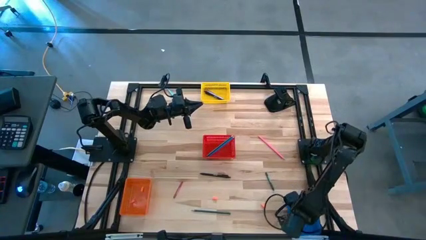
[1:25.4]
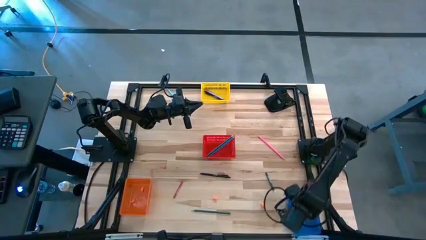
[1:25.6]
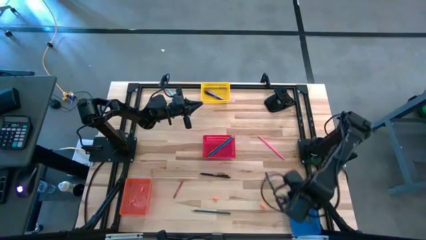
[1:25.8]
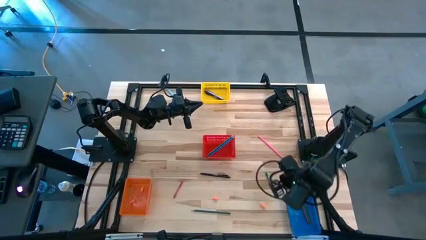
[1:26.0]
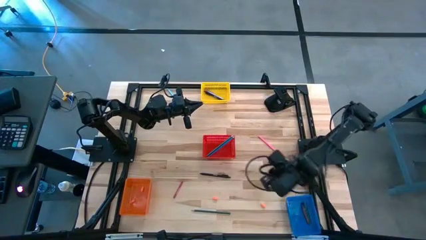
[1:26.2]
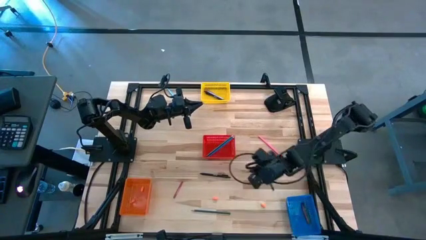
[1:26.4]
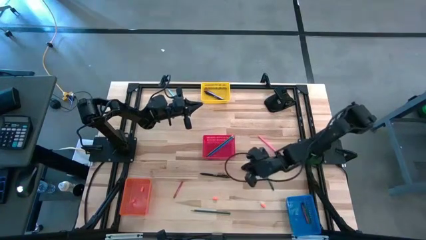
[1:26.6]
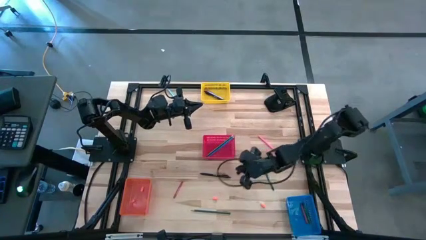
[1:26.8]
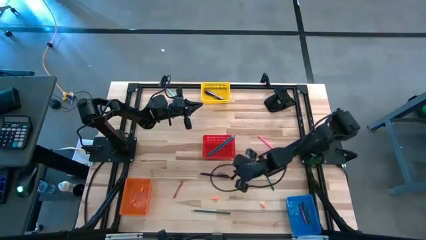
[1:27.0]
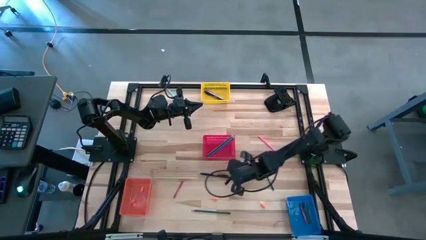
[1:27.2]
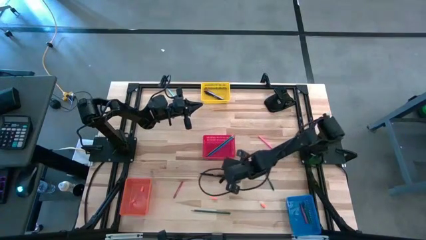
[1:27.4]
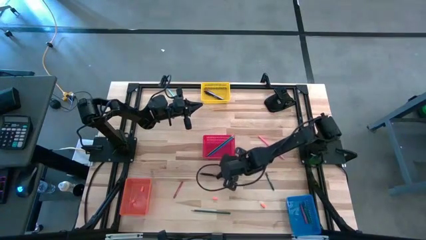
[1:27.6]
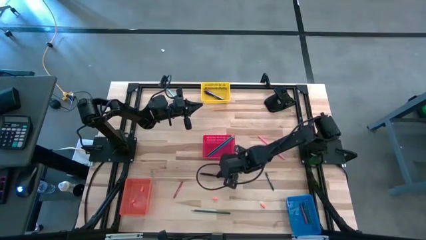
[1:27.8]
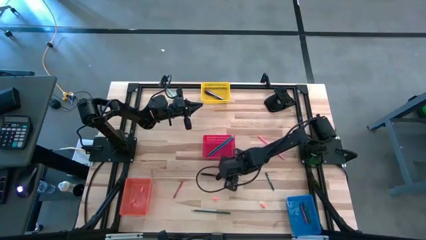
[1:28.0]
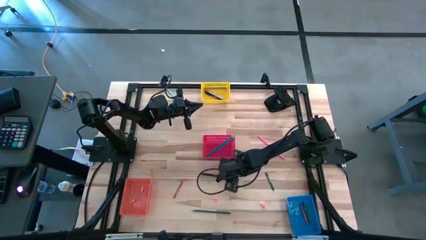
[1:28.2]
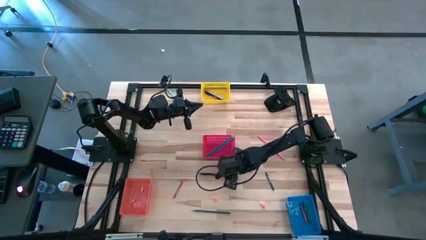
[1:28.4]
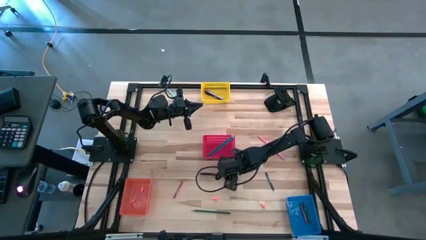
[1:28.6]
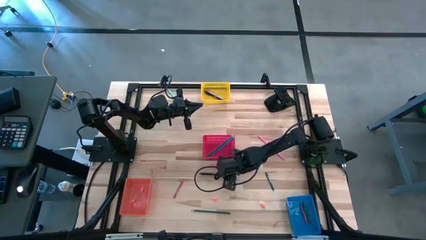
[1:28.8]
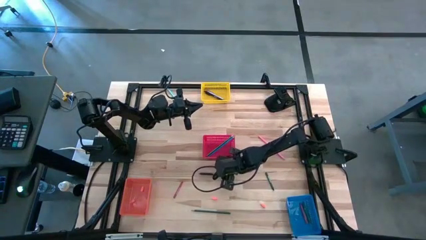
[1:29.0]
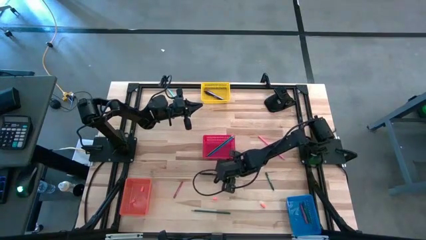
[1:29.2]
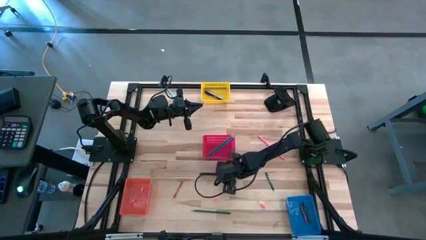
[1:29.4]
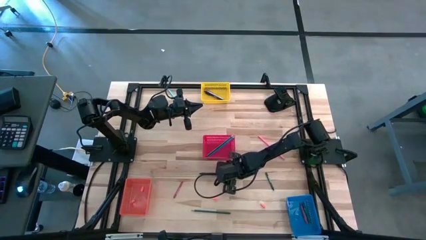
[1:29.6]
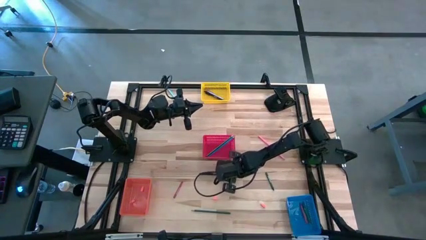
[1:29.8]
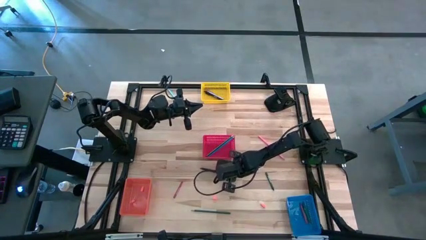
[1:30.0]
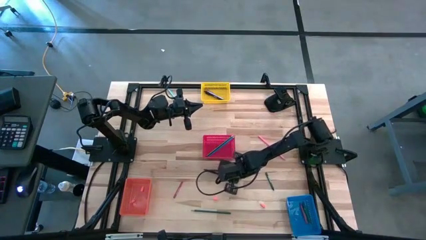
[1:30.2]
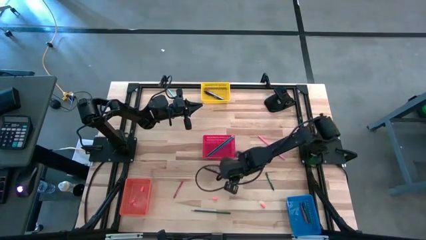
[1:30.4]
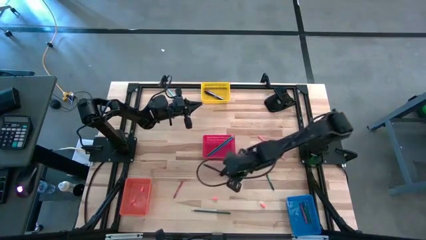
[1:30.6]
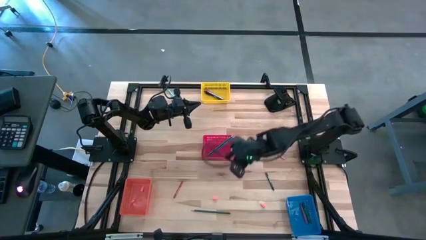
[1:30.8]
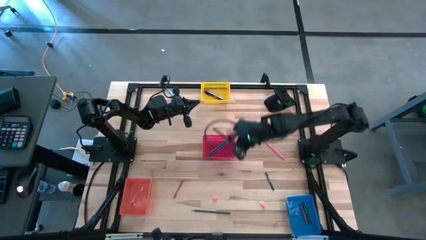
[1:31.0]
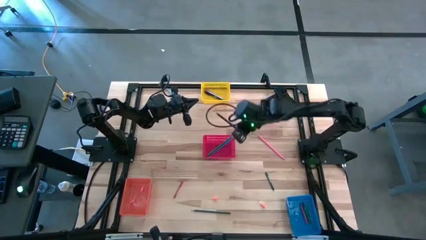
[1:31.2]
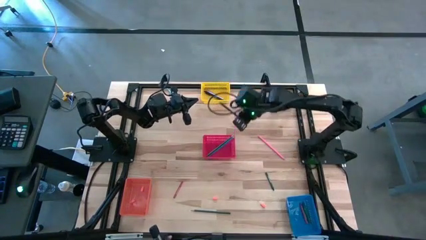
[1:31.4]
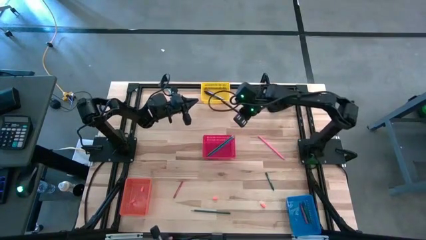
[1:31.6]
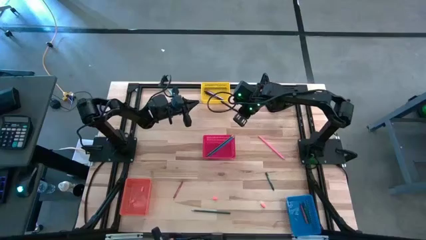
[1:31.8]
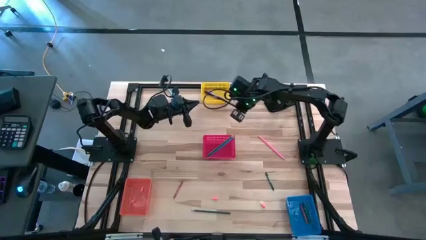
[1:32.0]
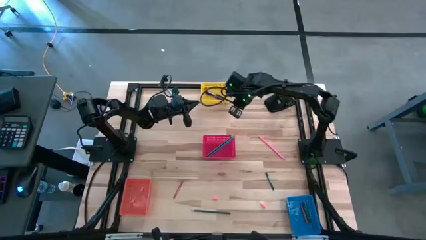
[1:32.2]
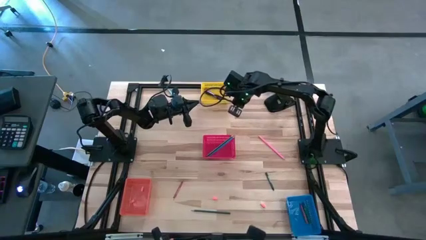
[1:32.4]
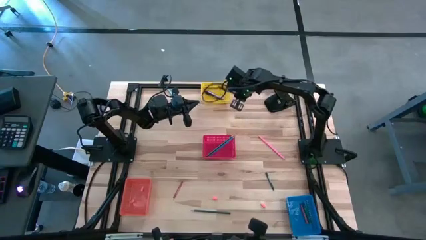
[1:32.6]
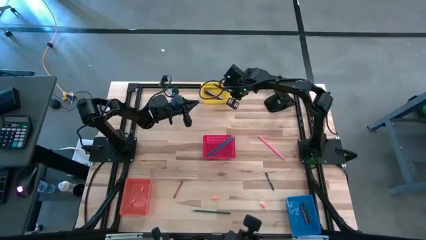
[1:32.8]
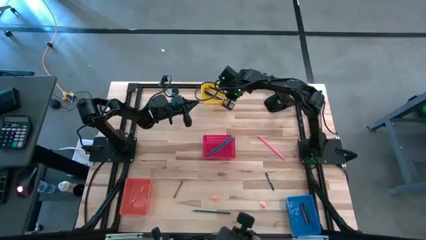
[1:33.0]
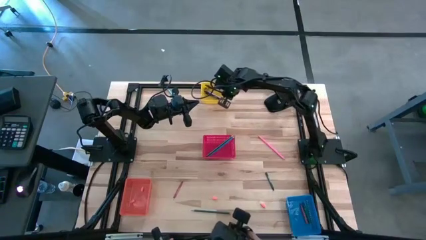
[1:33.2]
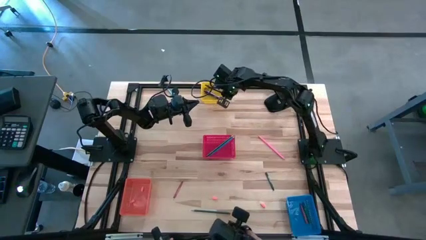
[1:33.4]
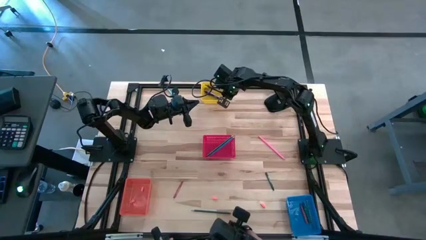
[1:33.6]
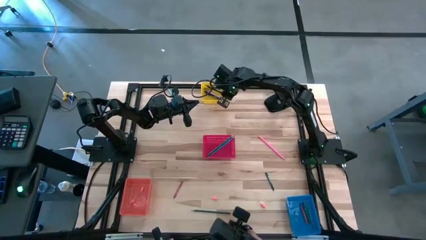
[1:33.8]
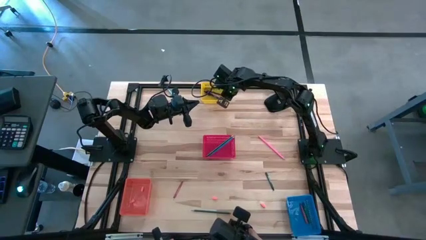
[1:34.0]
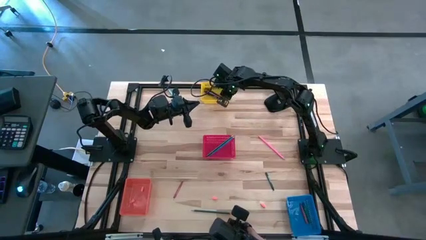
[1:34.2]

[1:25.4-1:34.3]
Task: Sort crayons/erasers/pens/pencils in bins
Put the black ball pen into the yellow bin

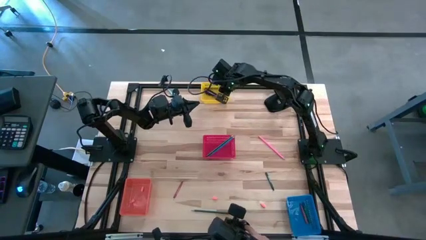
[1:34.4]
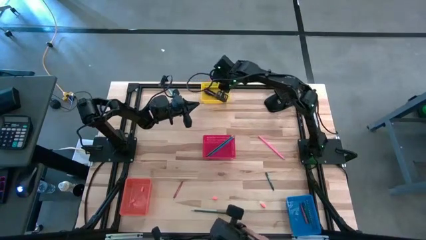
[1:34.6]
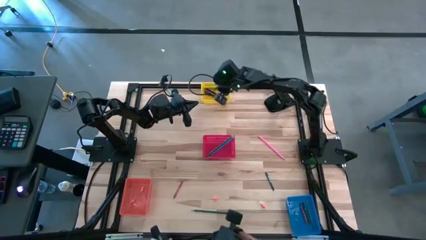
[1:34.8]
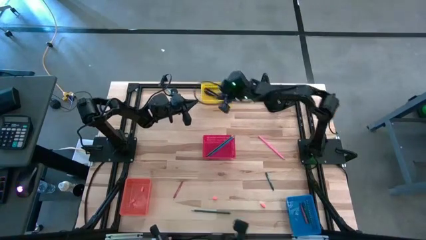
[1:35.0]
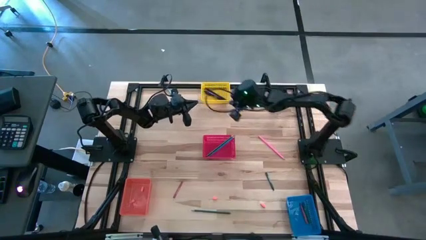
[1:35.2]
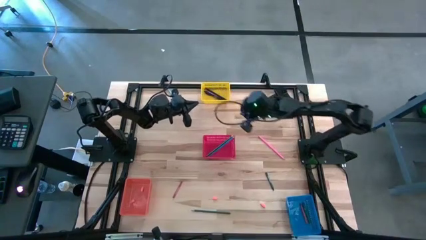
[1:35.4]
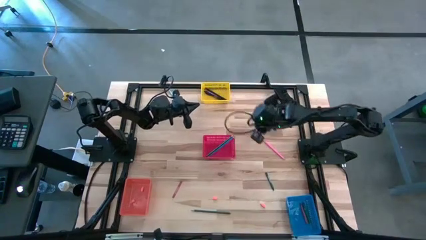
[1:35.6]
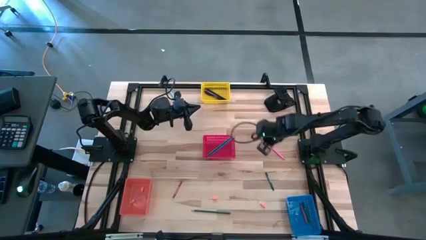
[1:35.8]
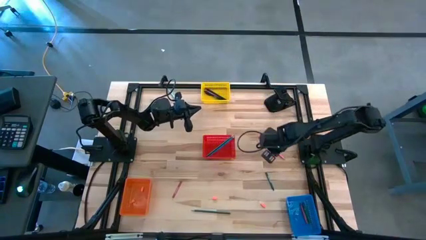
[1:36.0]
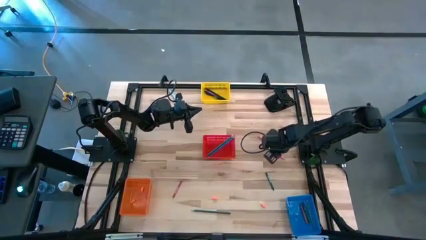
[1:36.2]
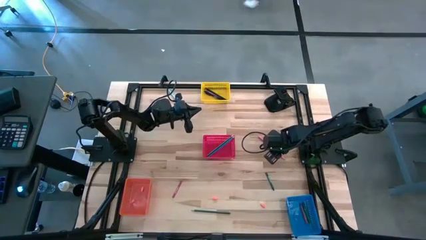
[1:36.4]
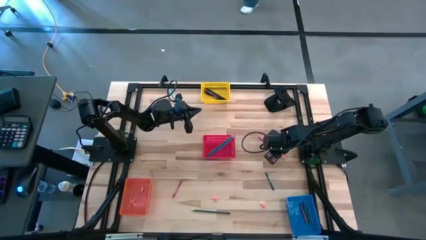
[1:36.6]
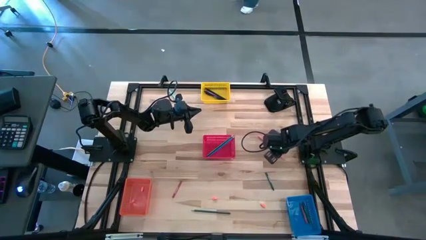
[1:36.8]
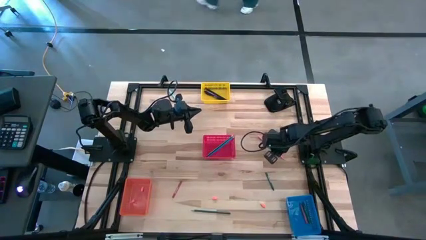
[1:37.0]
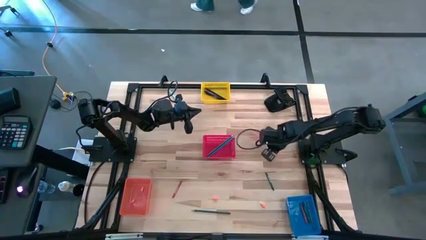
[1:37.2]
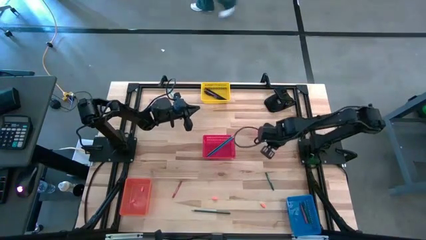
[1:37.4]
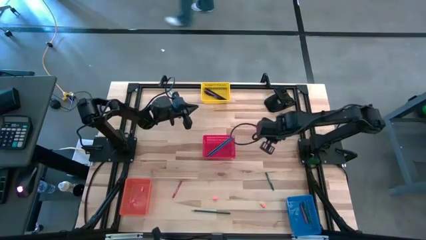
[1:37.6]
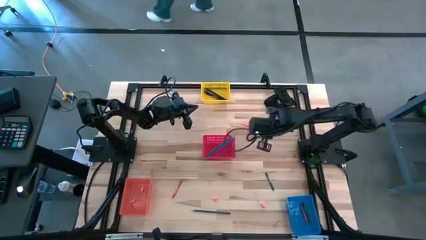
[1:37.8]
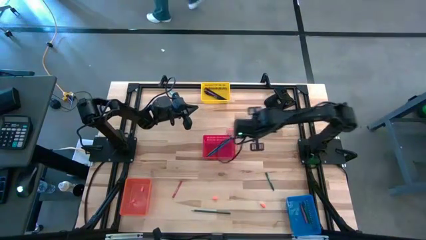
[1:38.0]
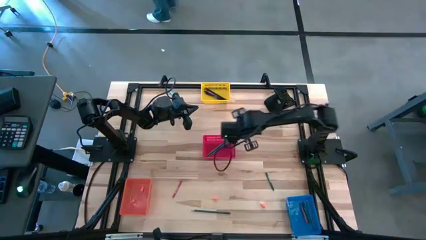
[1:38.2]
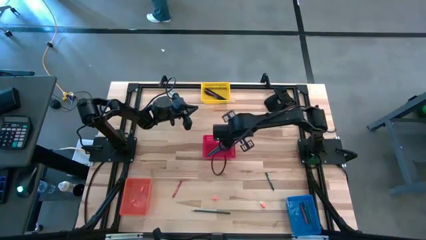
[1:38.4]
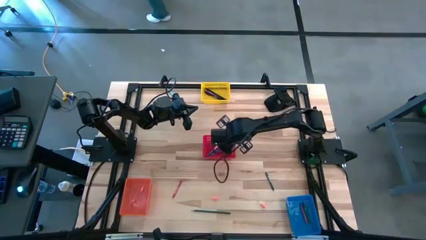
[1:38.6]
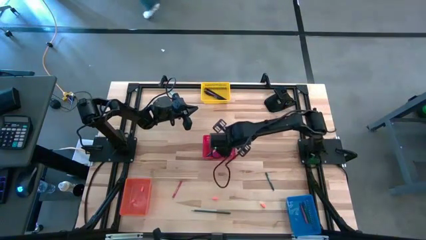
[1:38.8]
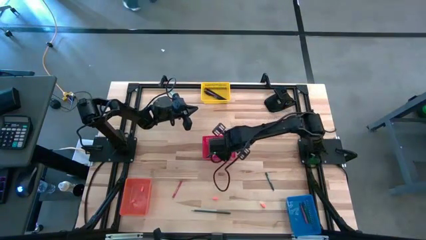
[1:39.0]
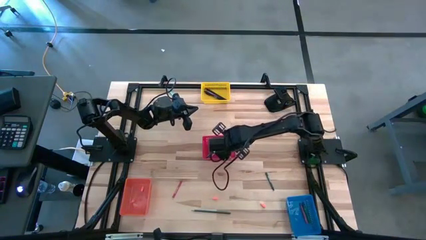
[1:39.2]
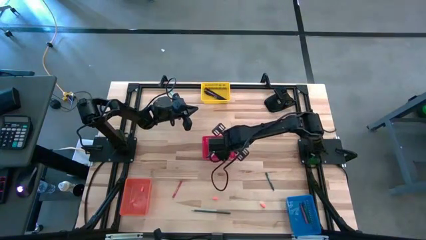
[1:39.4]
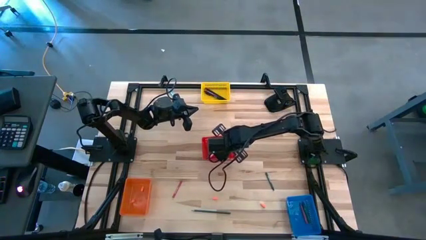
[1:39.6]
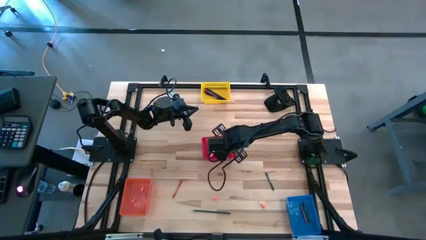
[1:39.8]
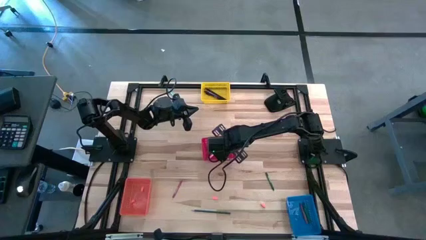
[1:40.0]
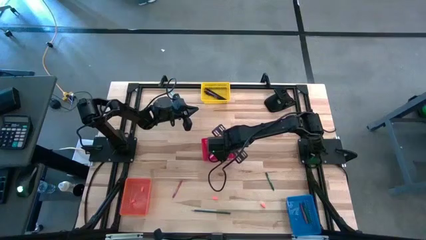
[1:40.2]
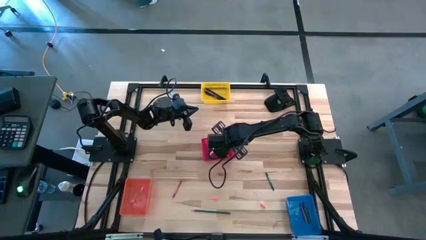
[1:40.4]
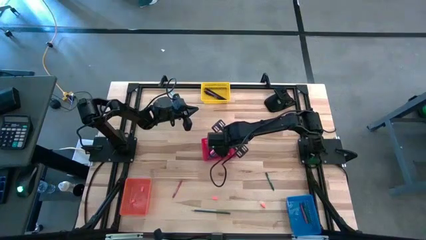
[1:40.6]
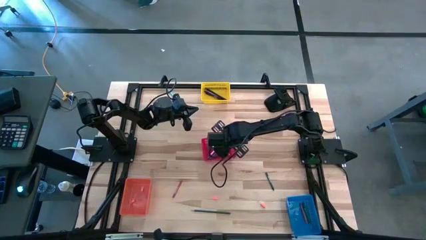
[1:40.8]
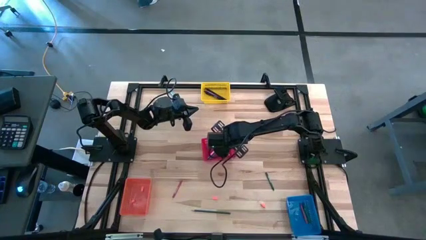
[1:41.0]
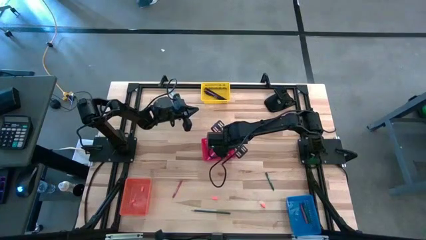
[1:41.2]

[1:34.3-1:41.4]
Put the pink pencil into the red bin

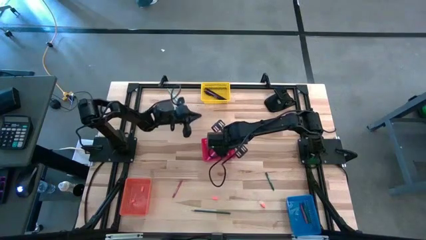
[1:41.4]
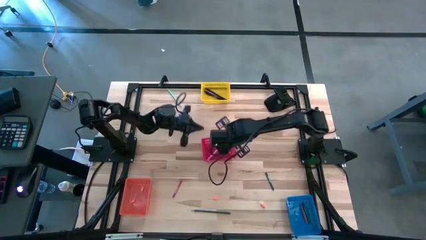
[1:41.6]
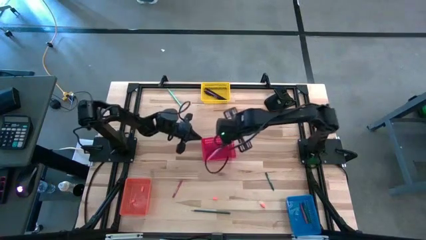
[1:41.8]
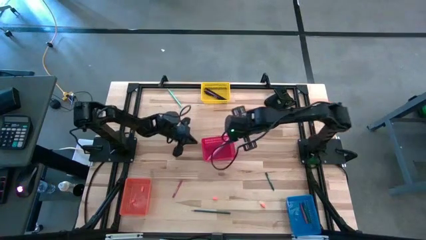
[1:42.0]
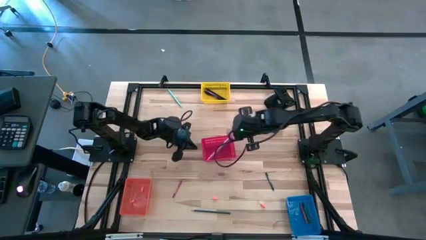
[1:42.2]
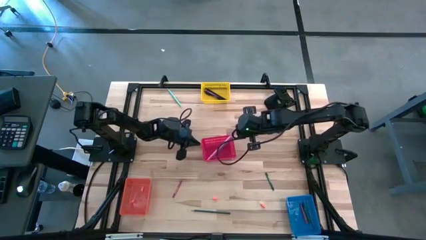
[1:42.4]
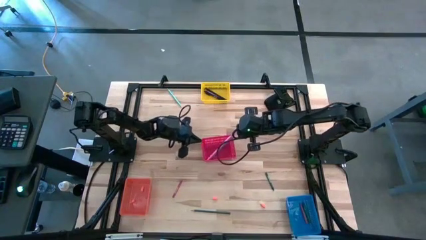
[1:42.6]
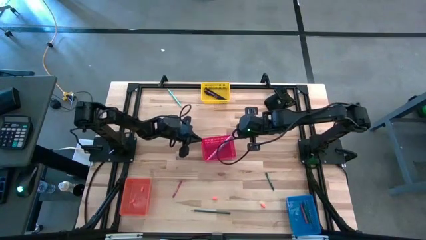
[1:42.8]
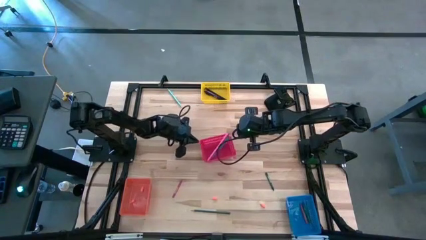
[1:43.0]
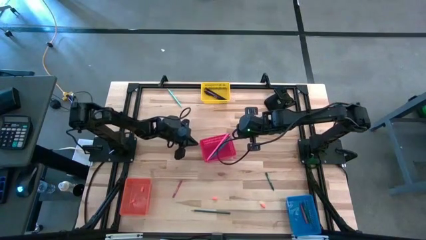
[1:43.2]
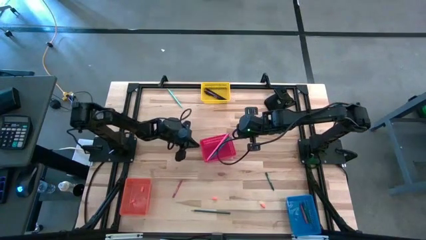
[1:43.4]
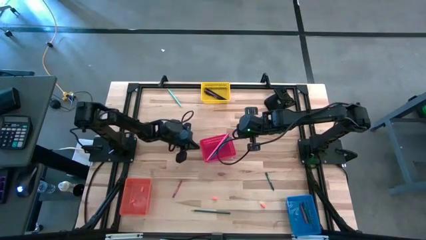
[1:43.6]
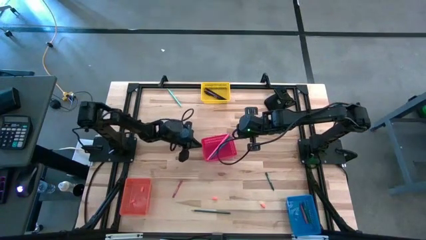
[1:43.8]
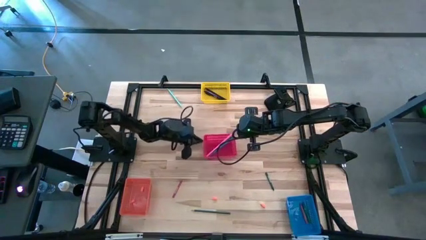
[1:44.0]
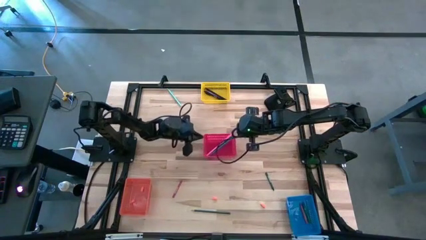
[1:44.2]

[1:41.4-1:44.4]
Adjust the red bin
